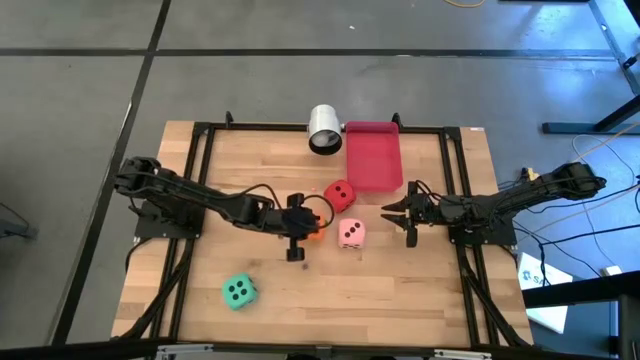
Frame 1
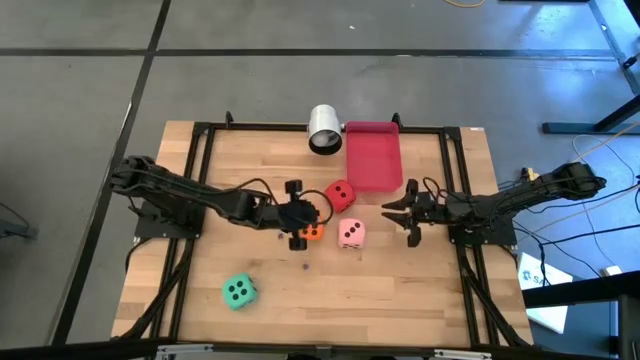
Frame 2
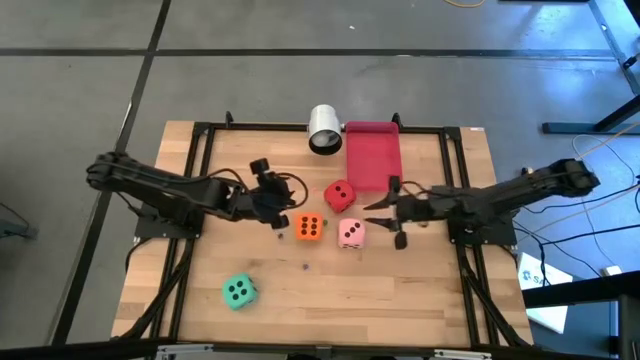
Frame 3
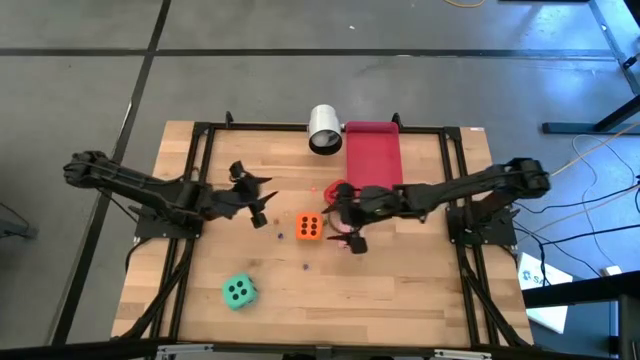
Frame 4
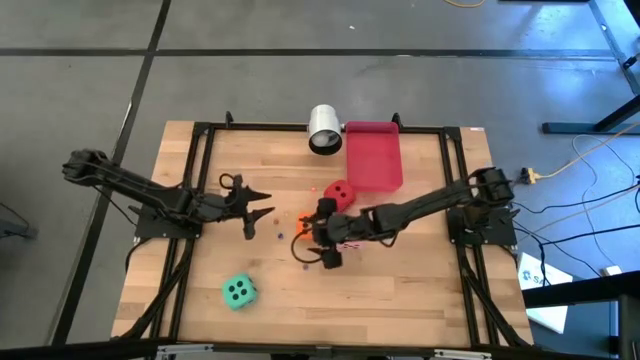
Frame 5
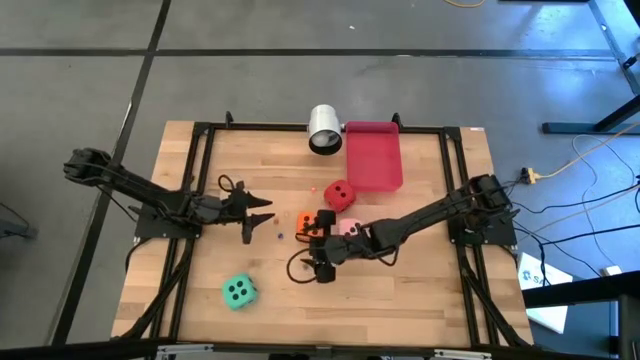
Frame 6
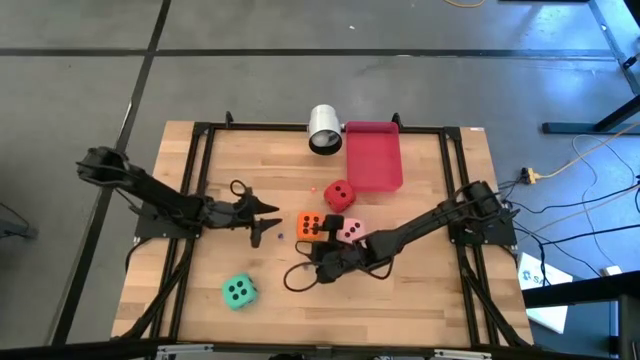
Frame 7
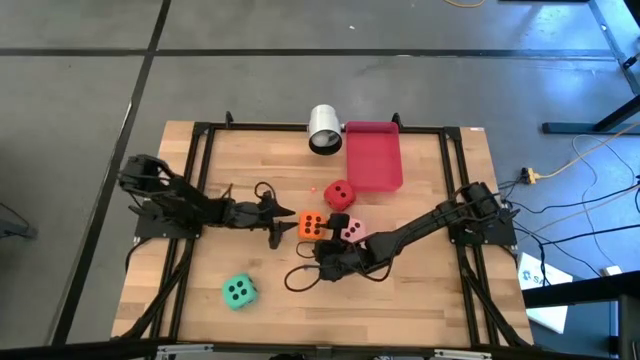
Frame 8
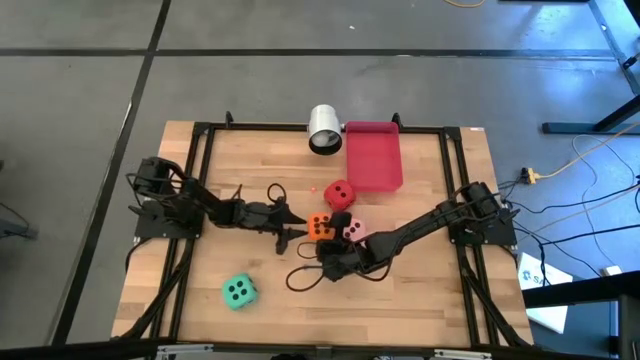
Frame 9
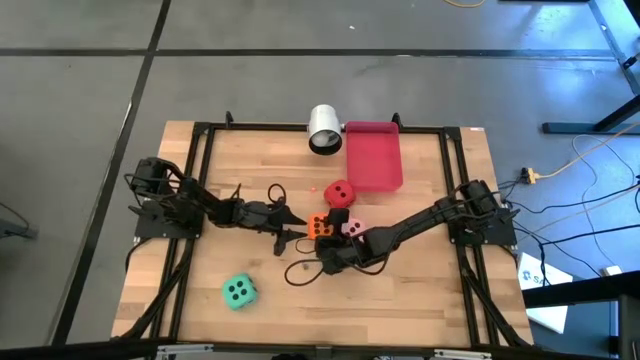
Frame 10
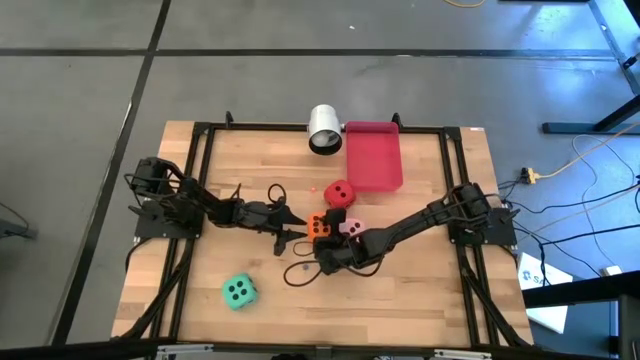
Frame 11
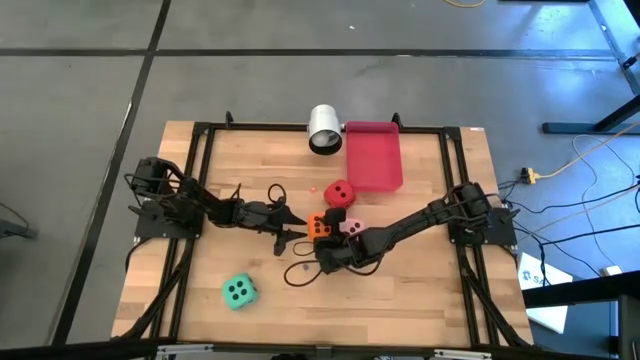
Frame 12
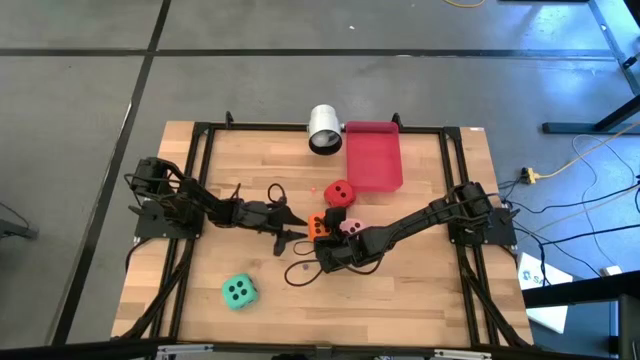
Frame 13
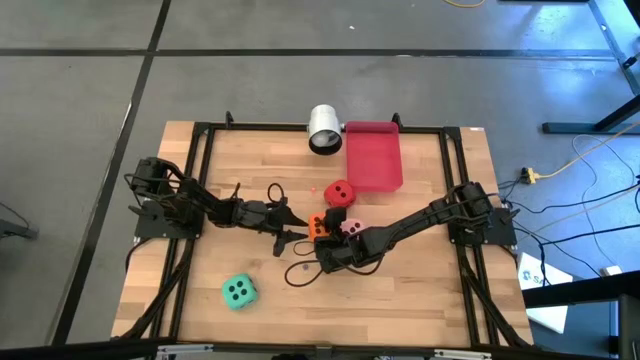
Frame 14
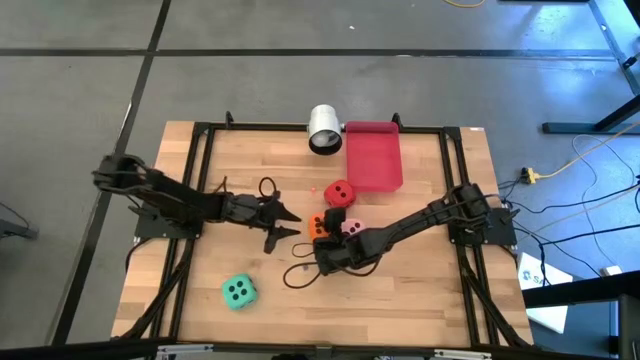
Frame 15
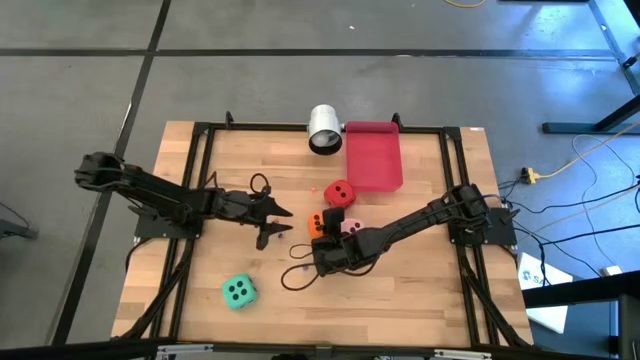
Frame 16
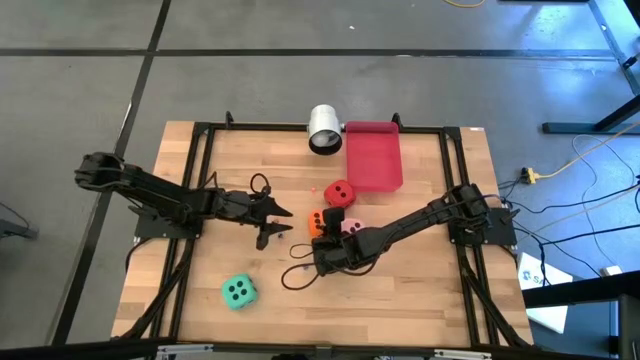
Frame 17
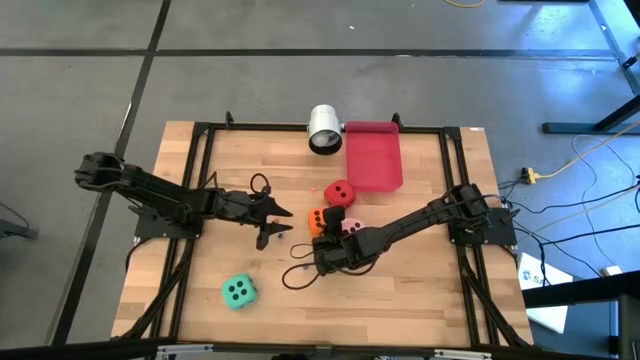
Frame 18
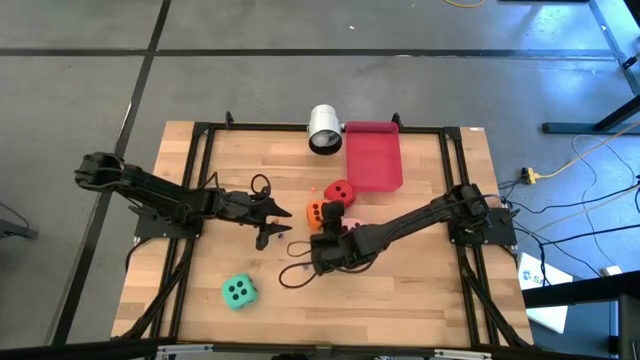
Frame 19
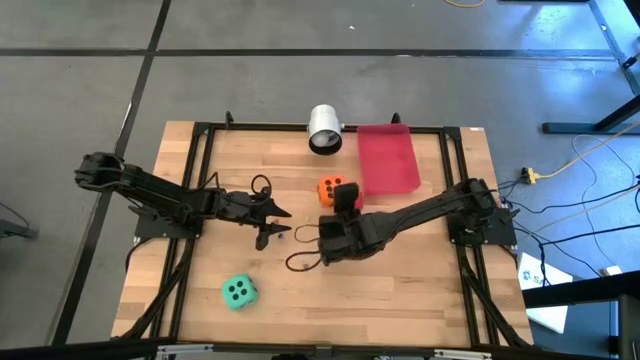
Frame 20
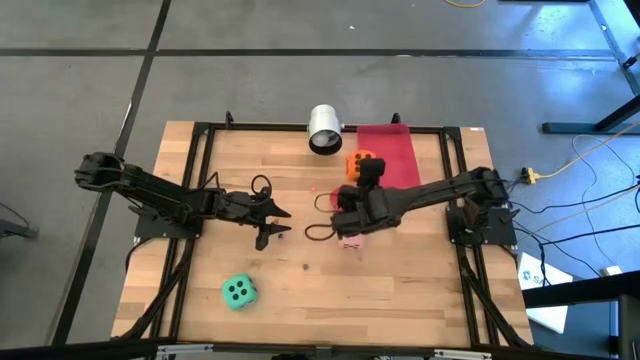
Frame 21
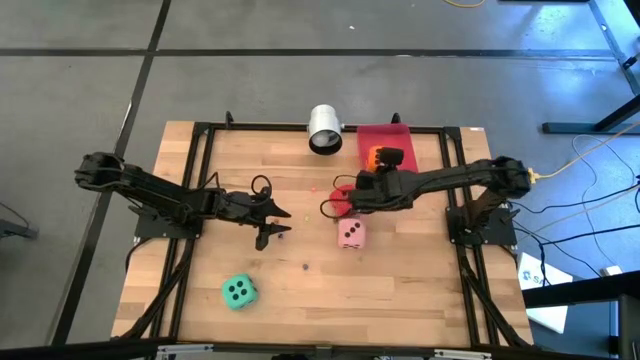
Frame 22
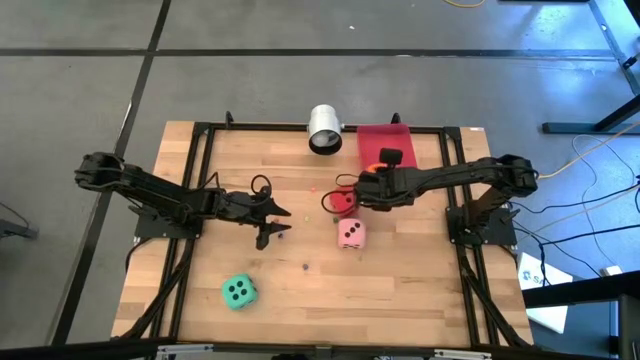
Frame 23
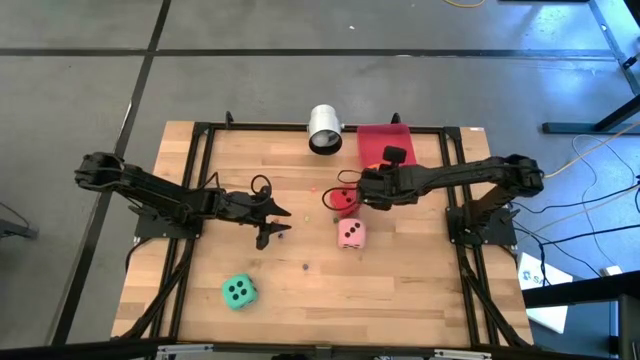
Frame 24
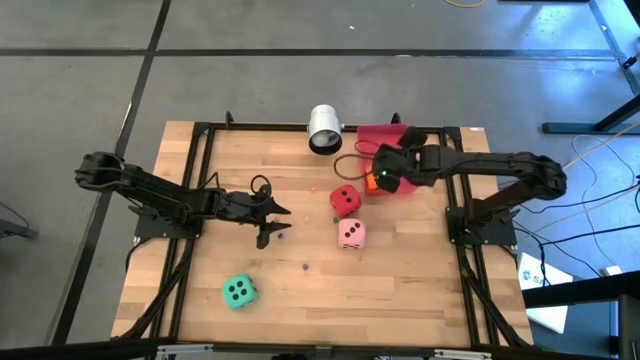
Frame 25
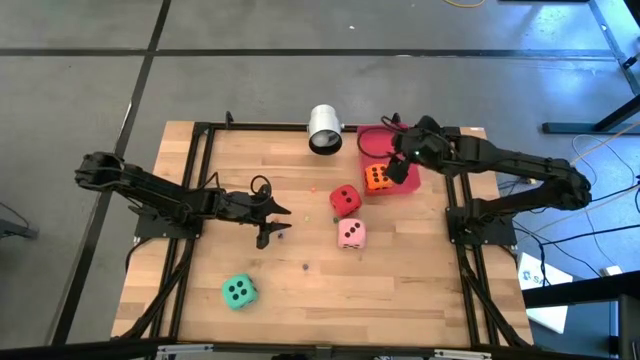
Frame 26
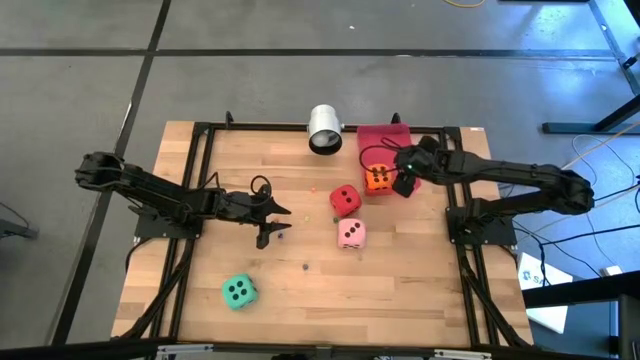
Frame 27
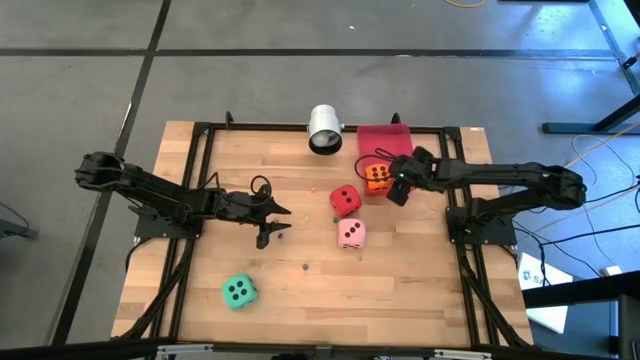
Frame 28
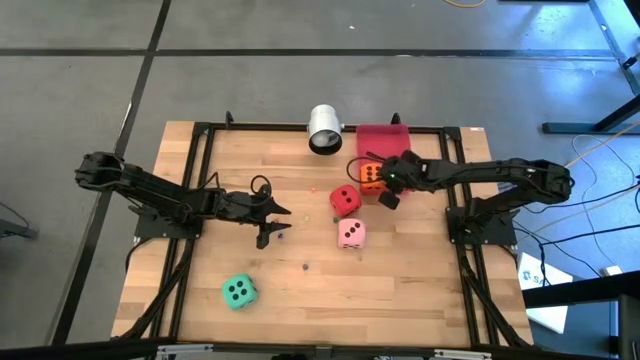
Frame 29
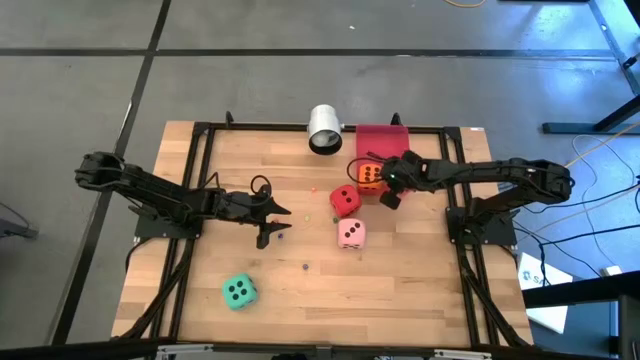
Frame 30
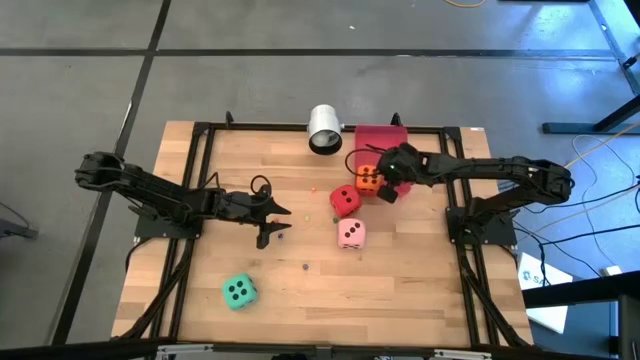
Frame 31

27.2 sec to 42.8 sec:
Task: Pick & Place Dice
Put the big orange dice into the red bin

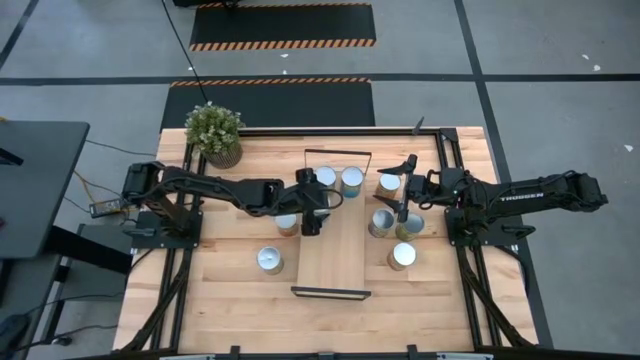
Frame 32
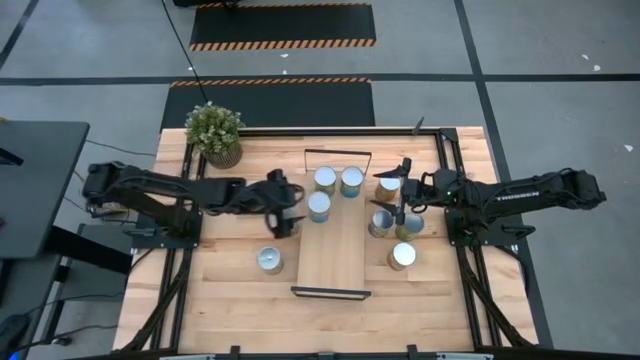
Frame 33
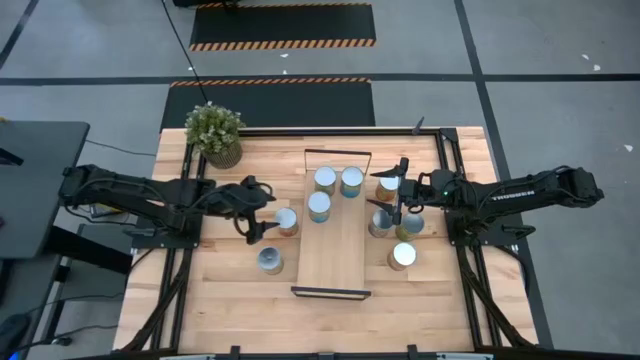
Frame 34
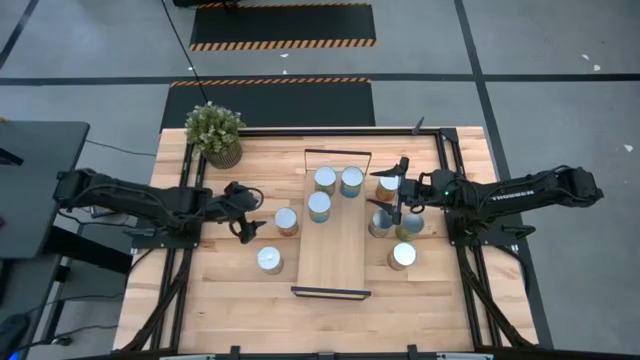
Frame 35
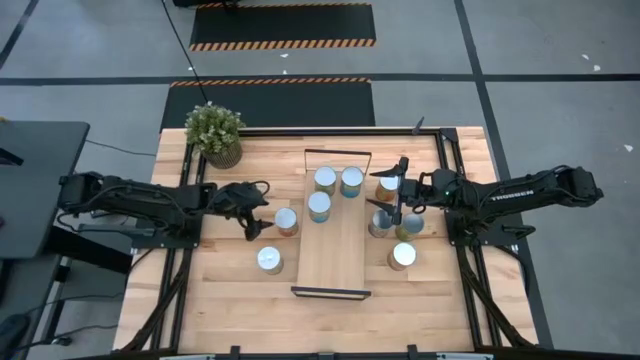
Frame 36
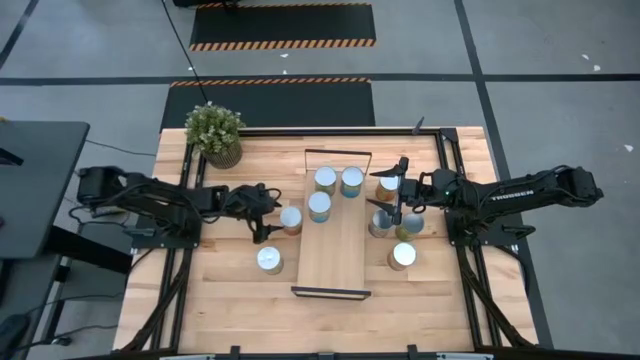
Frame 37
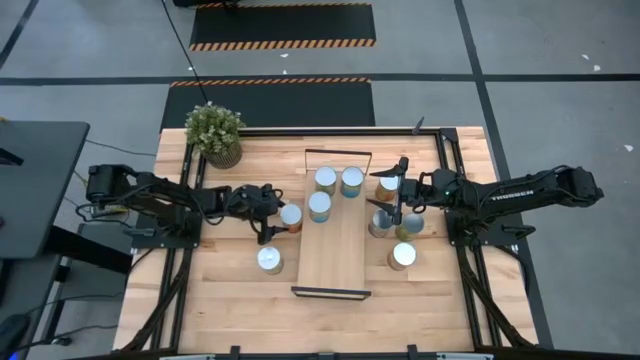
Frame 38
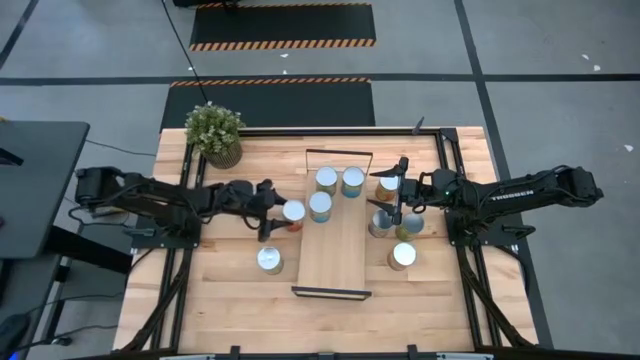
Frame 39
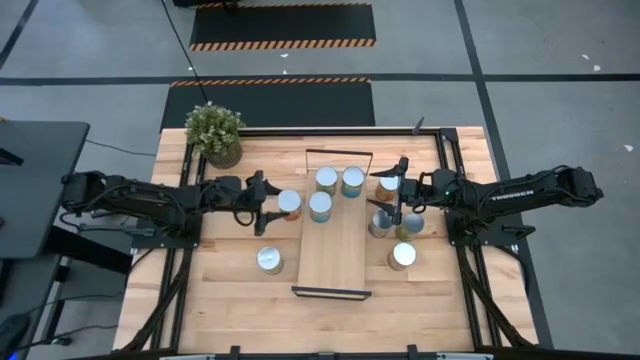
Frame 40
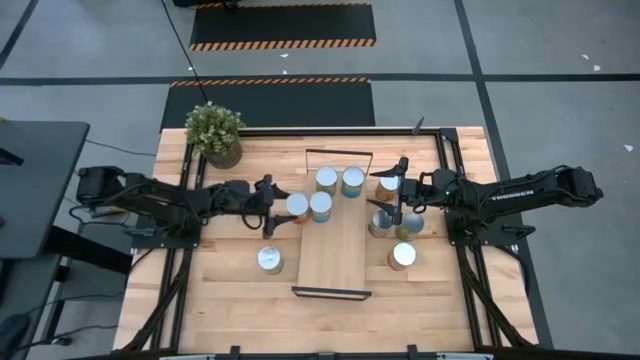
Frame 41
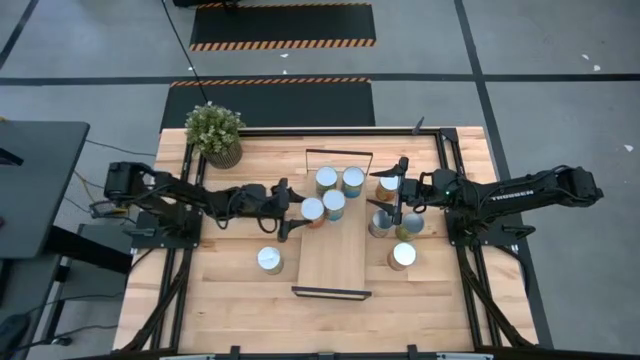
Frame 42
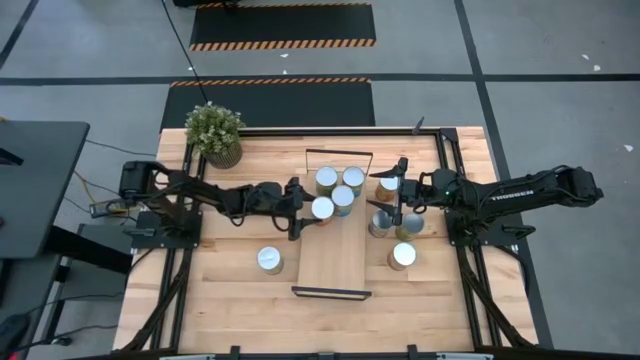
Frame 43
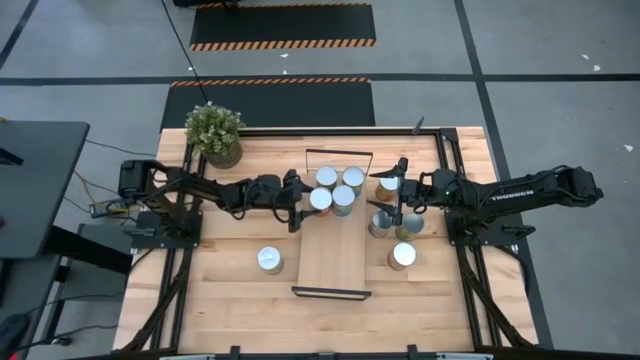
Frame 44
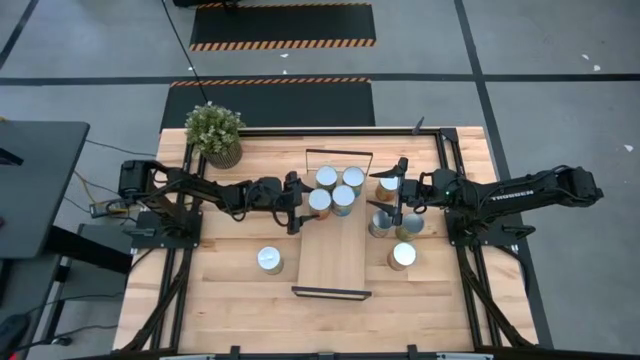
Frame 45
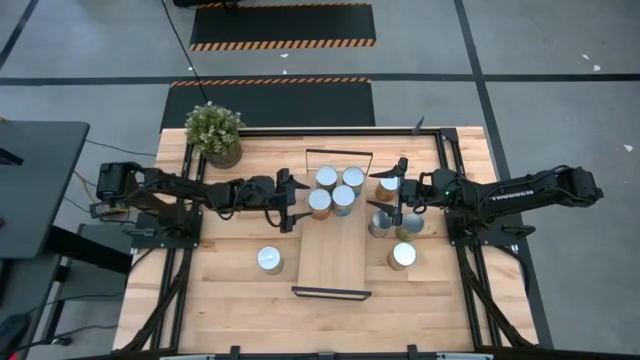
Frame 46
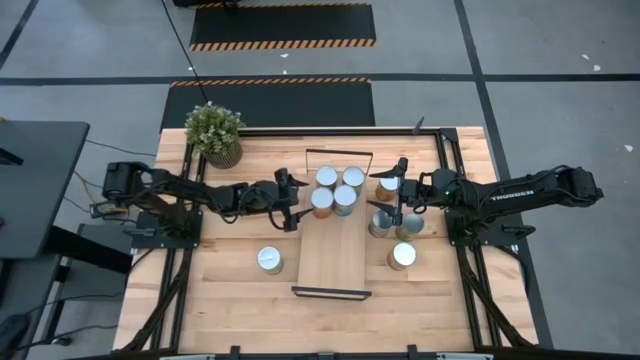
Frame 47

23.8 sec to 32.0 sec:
Task: Pick and place cans onto a shelf
Put the top canned pineapple on the shelf
